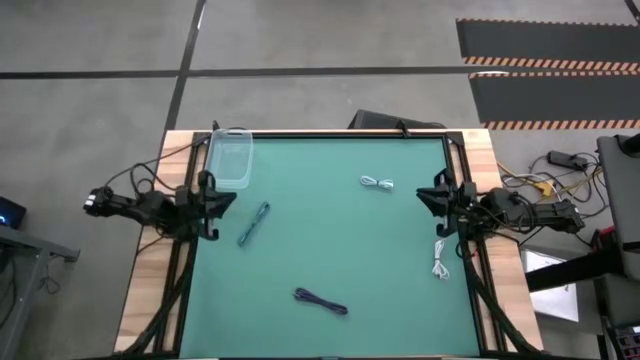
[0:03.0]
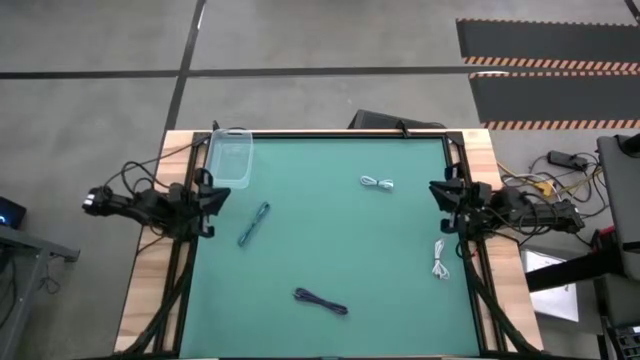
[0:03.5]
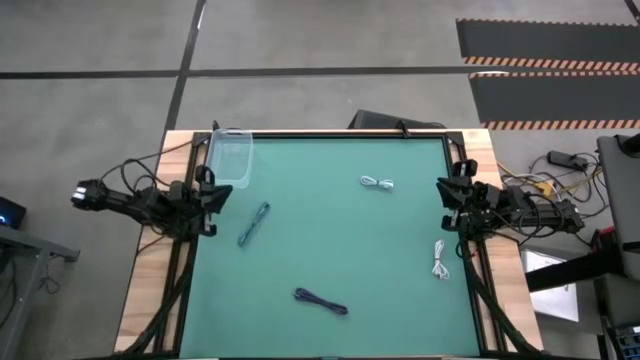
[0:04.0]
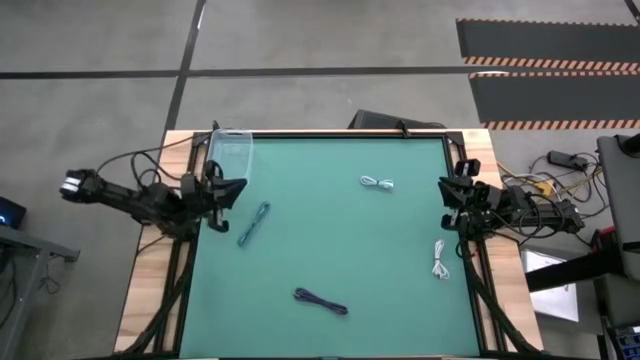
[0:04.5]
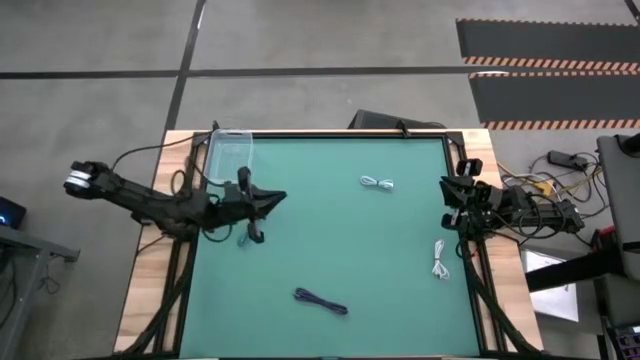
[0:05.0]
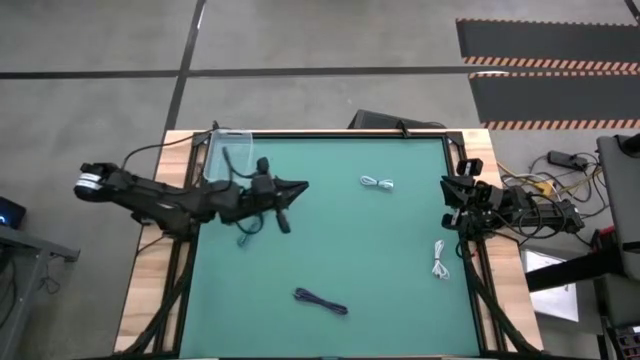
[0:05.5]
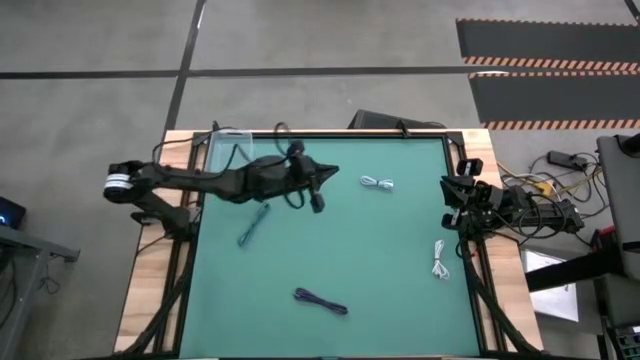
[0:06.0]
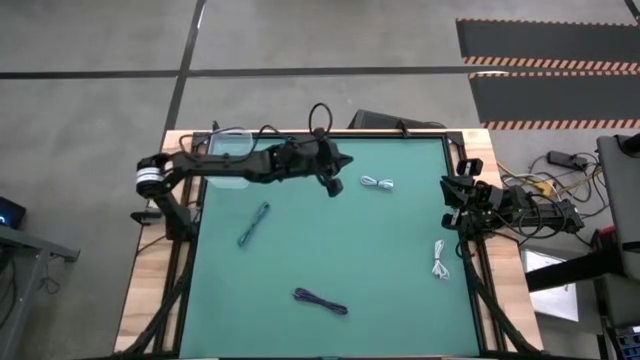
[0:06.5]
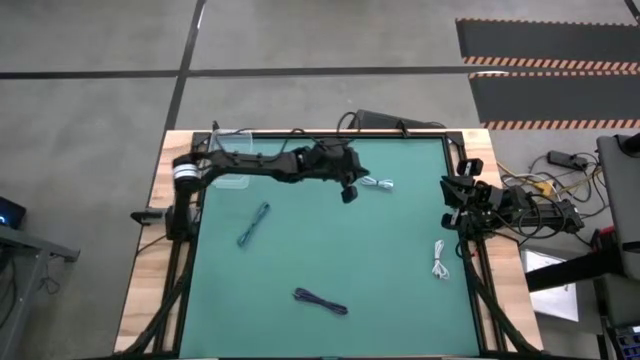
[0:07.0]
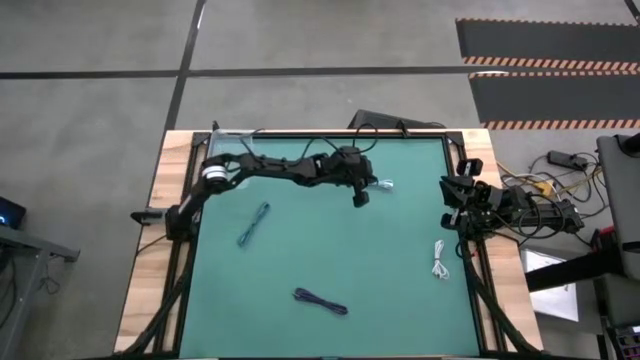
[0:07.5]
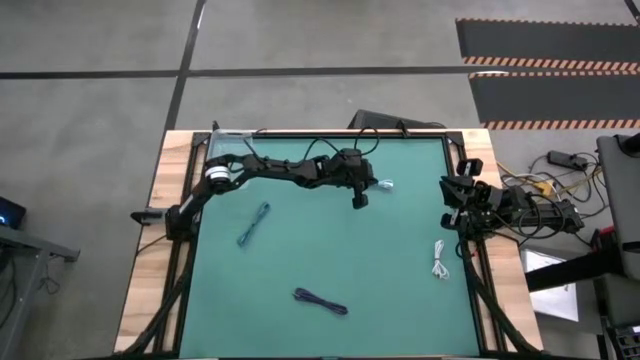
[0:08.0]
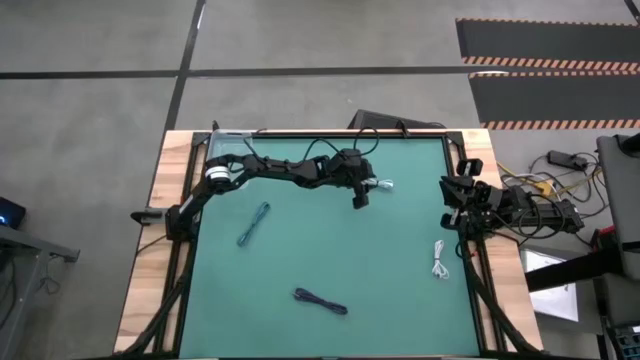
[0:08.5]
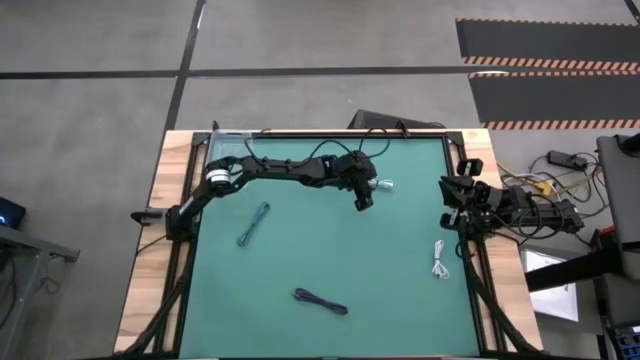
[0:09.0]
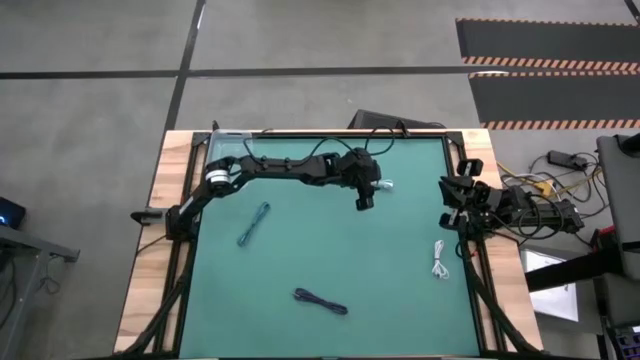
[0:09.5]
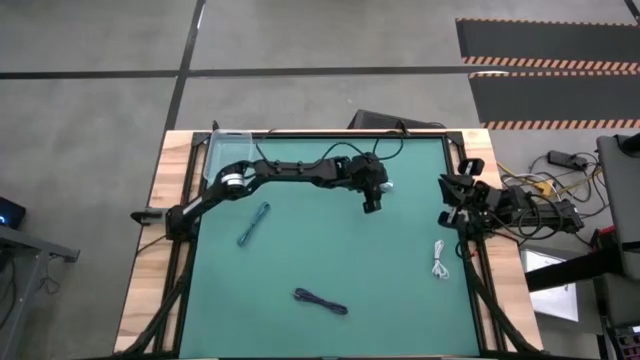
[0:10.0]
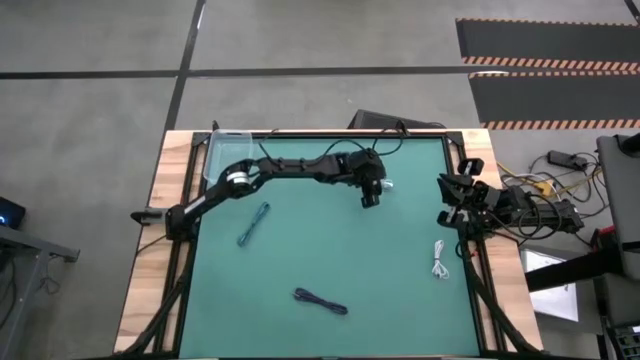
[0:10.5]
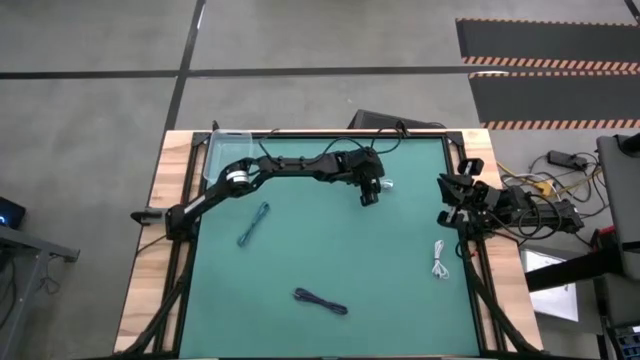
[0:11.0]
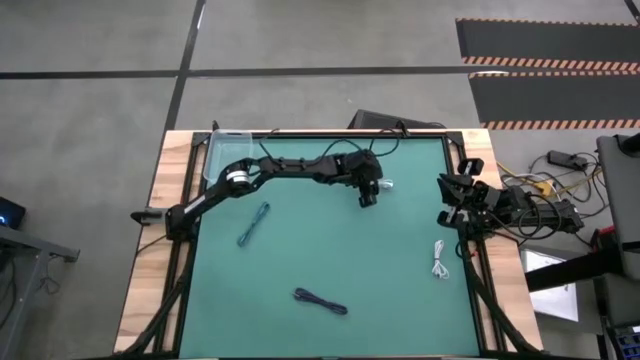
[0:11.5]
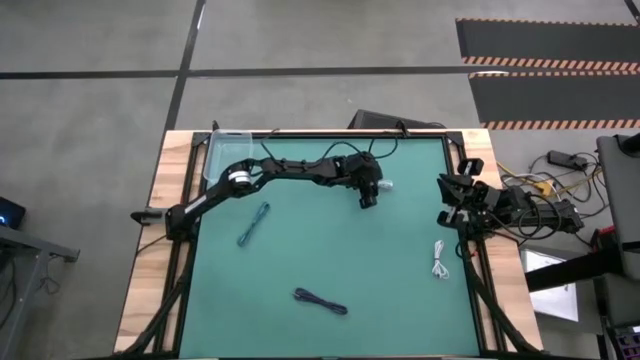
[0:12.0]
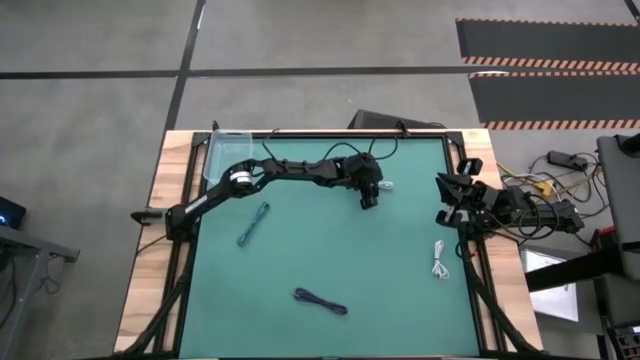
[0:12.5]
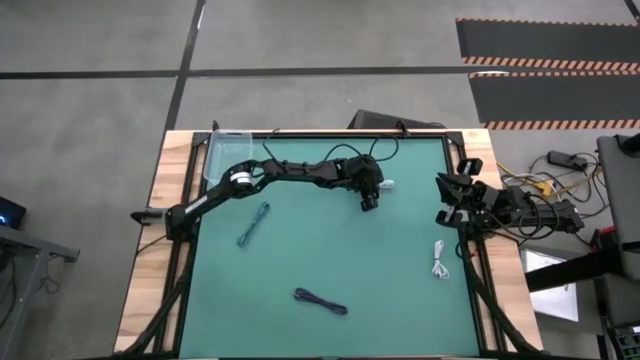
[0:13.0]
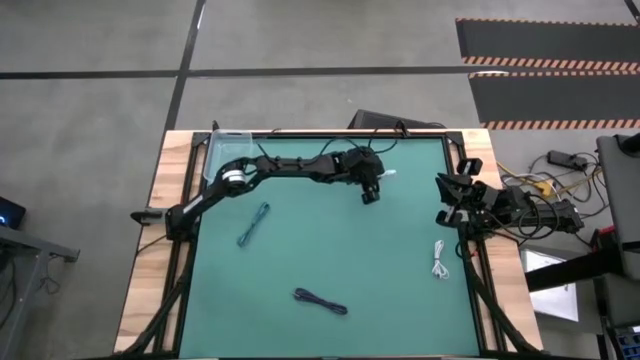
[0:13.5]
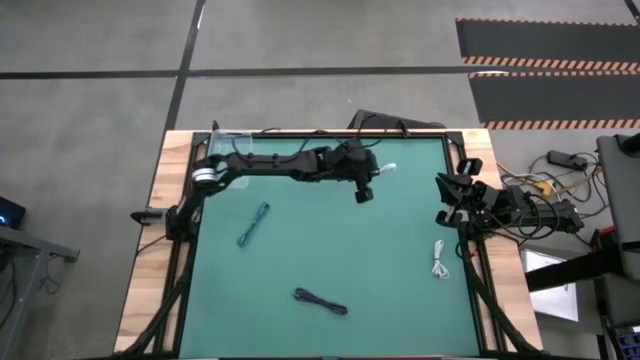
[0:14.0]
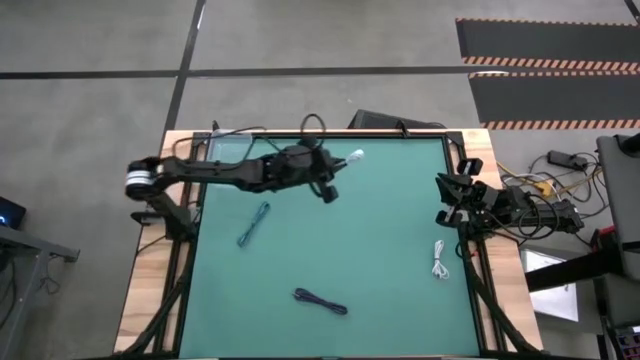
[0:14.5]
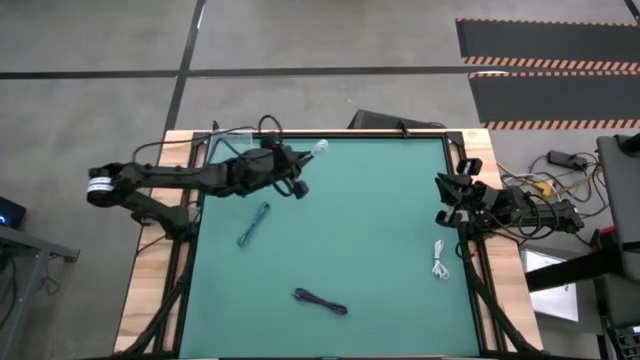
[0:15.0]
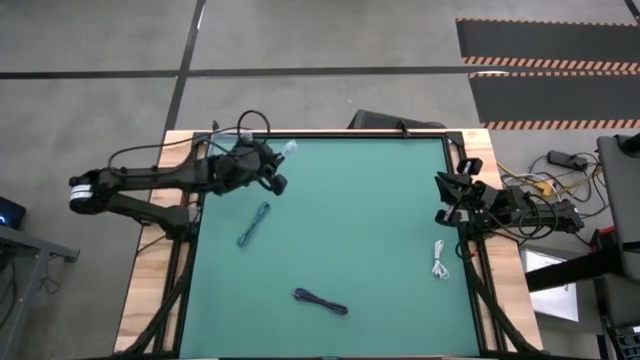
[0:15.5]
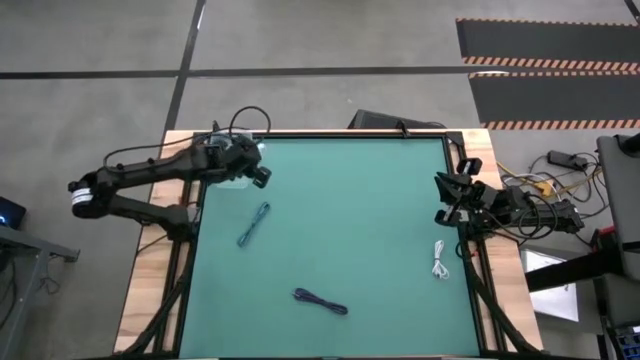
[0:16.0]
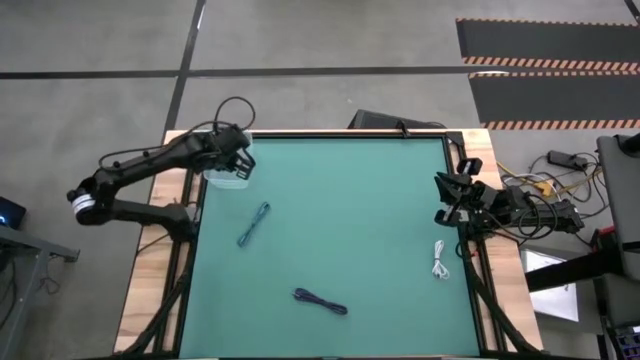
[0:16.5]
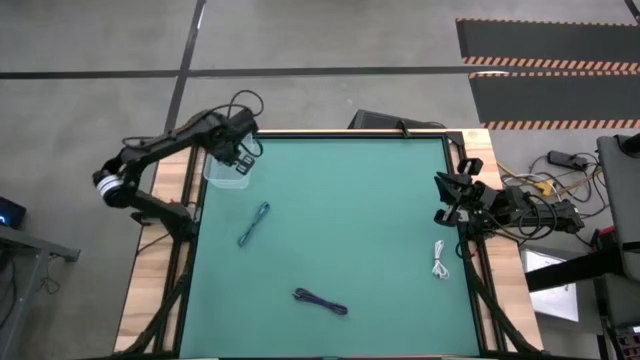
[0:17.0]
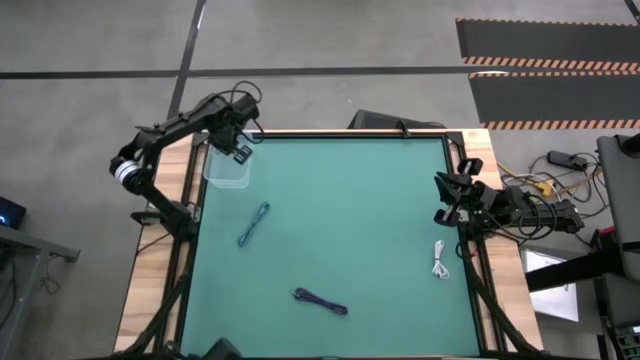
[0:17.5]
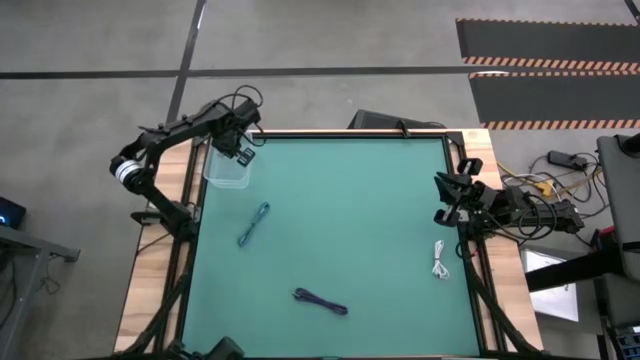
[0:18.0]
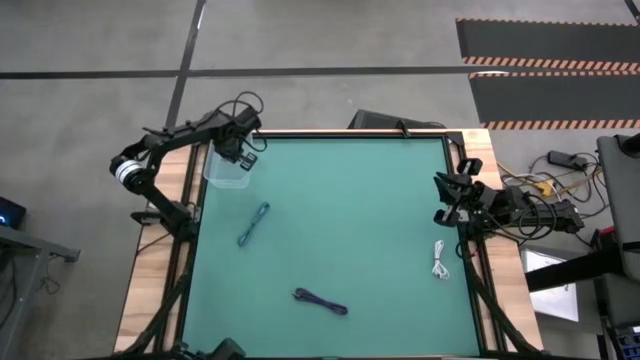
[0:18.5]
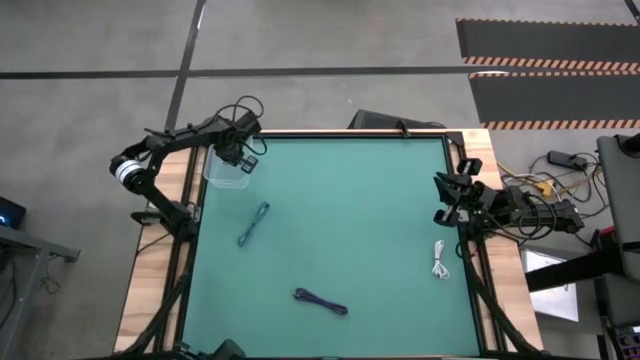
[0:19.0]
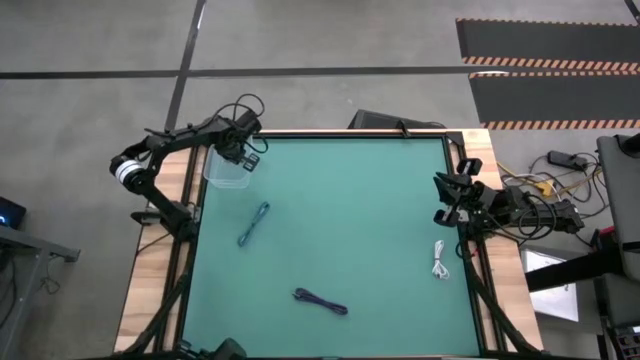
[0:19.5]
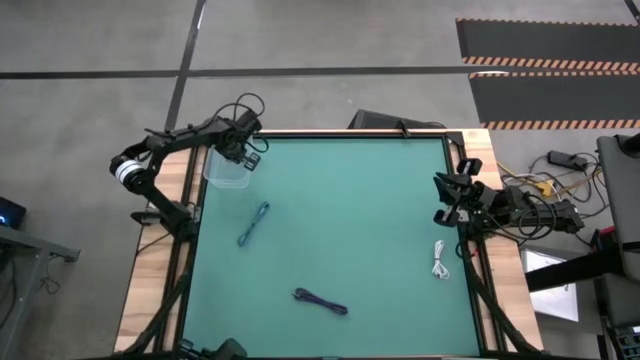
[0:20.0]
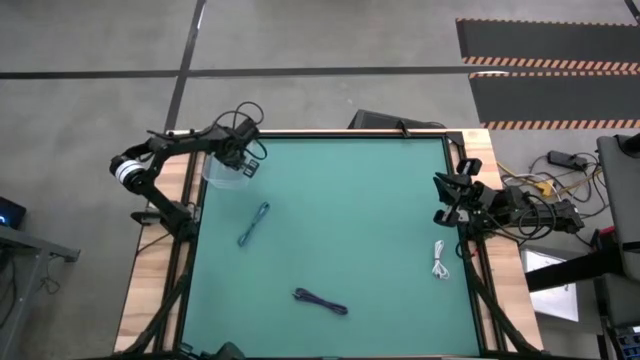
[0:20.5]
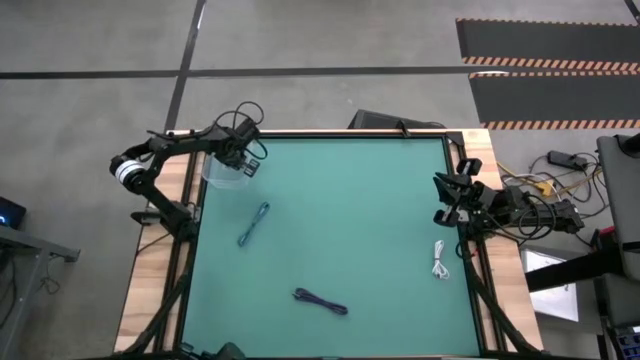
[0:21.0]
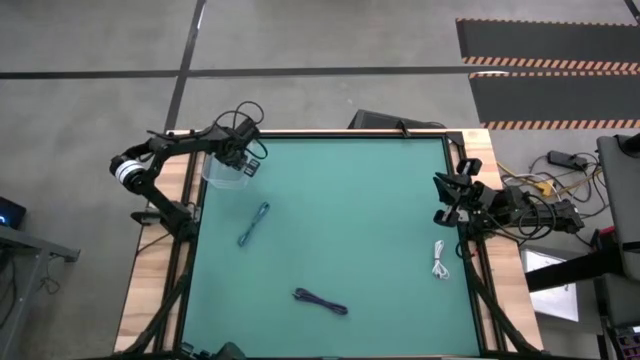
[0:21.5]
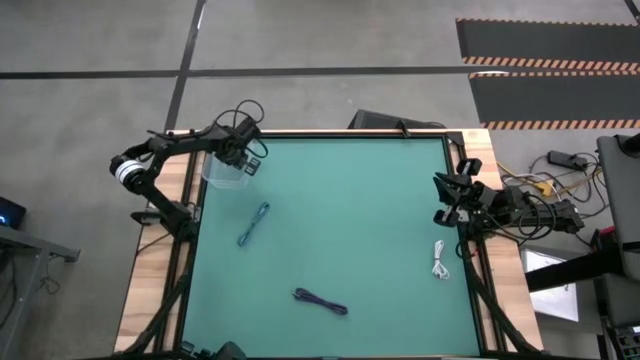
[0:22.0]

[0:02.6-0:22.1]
Task: Pick and place USB-C Cables
Put the light blue charger cable into the transparent bin
